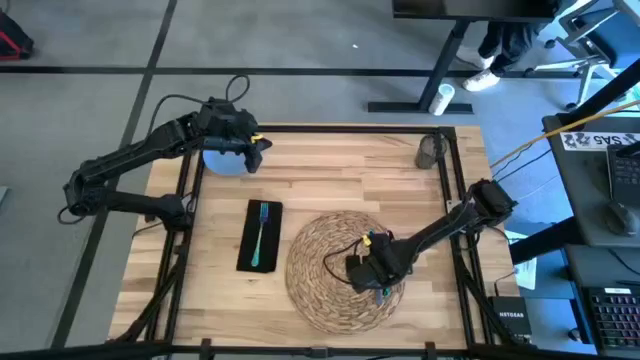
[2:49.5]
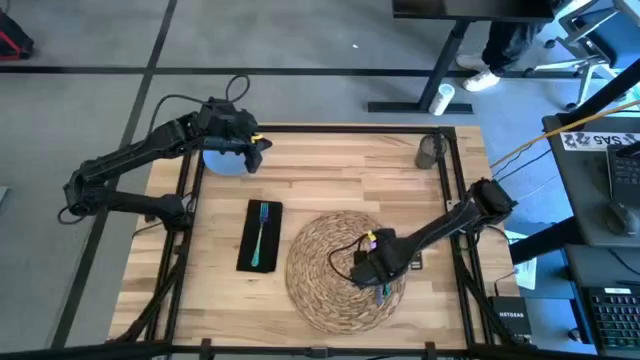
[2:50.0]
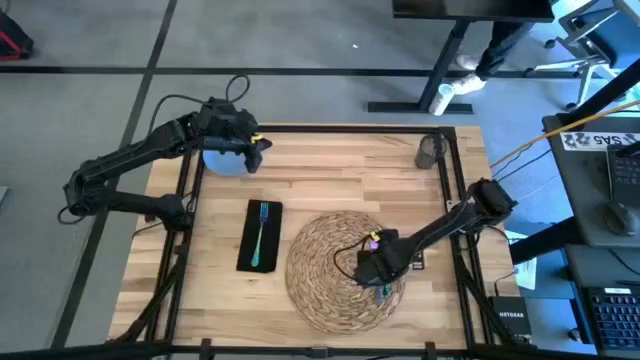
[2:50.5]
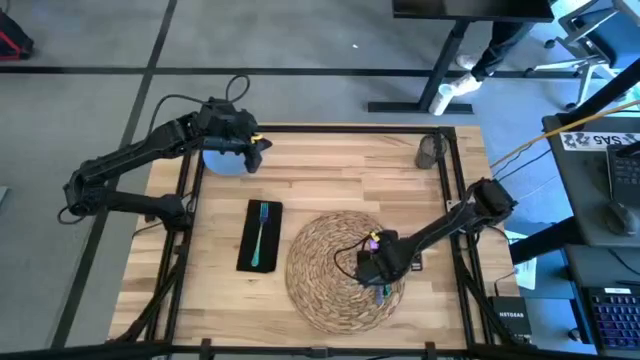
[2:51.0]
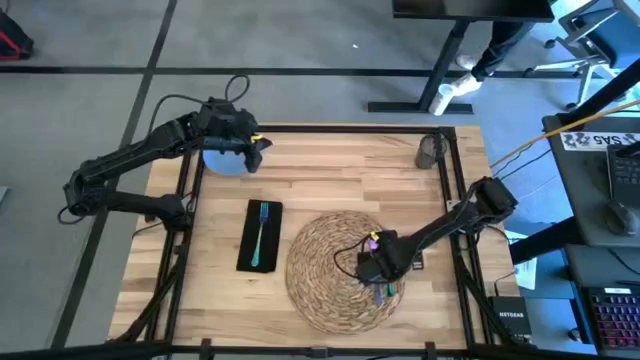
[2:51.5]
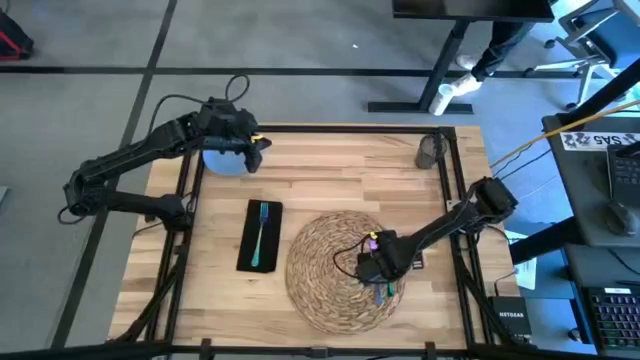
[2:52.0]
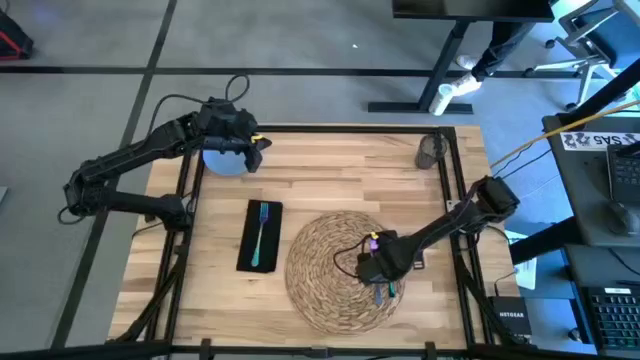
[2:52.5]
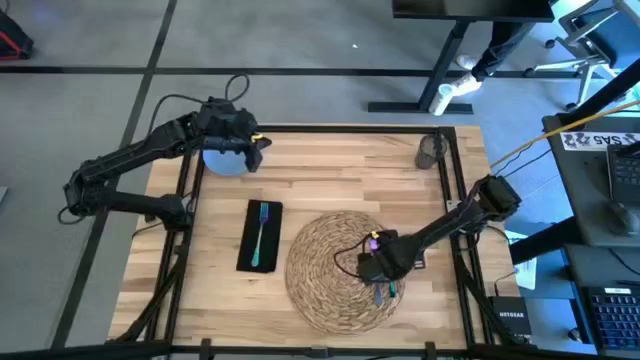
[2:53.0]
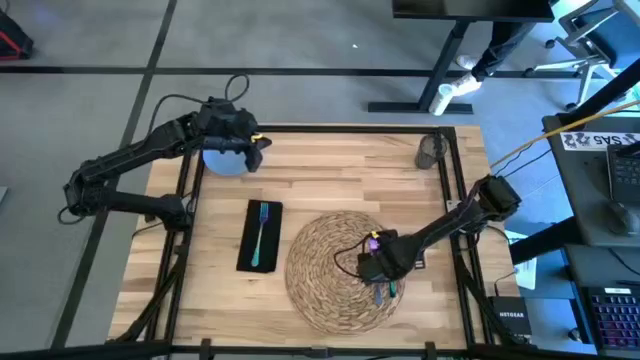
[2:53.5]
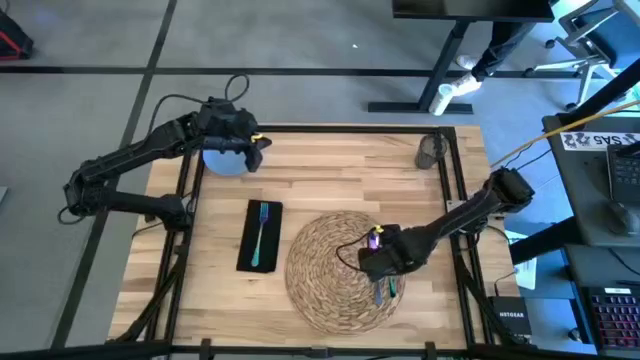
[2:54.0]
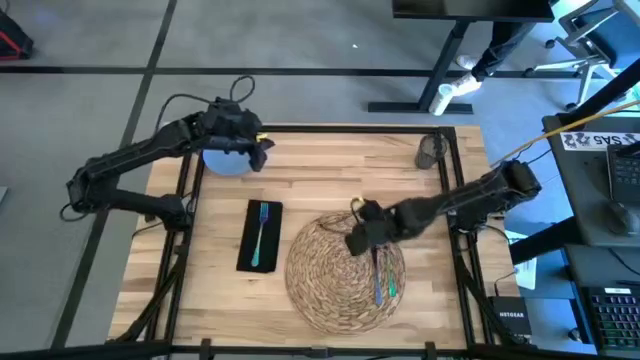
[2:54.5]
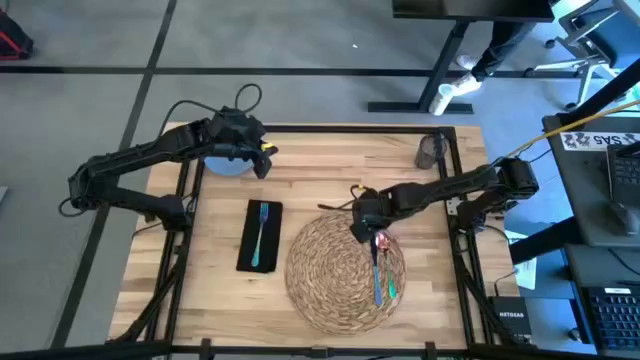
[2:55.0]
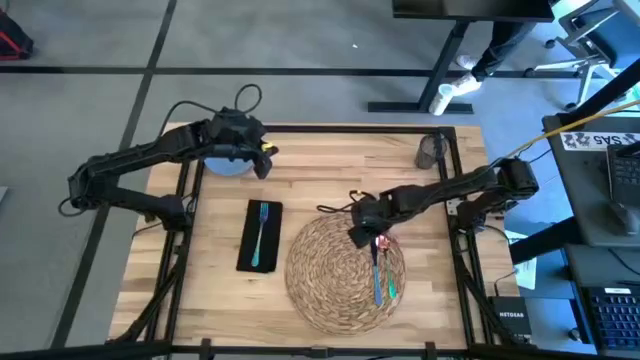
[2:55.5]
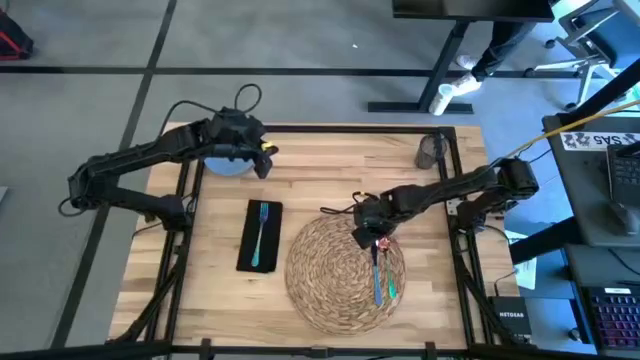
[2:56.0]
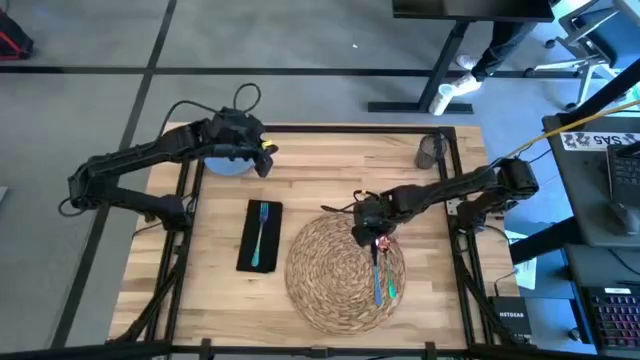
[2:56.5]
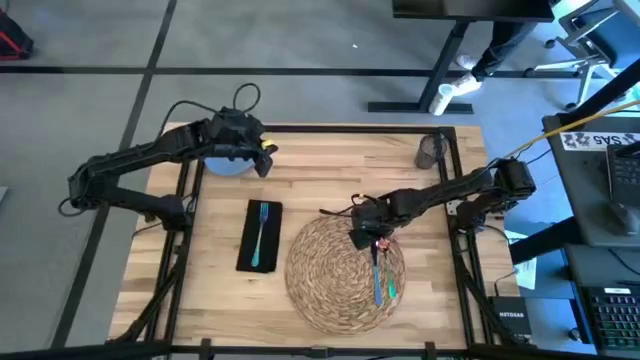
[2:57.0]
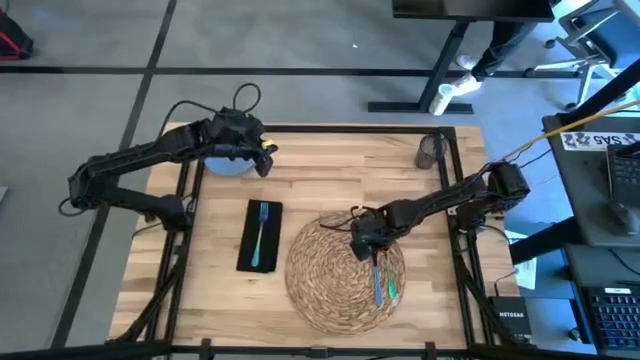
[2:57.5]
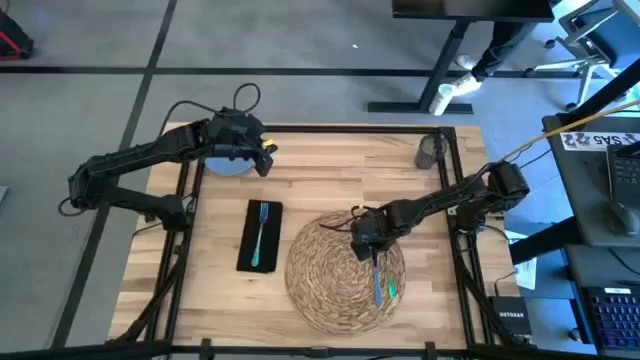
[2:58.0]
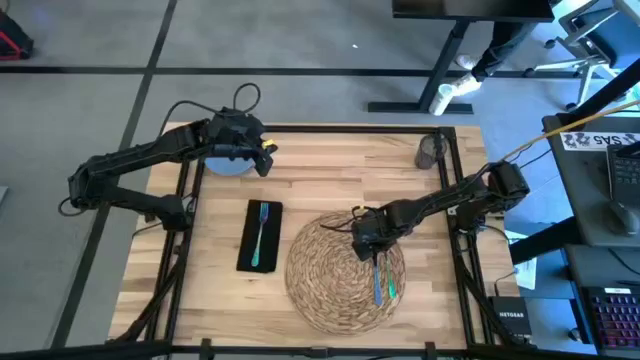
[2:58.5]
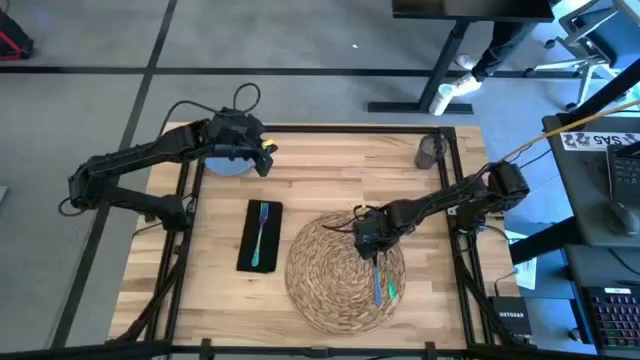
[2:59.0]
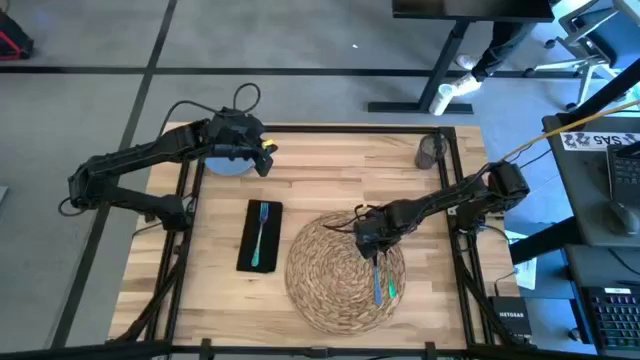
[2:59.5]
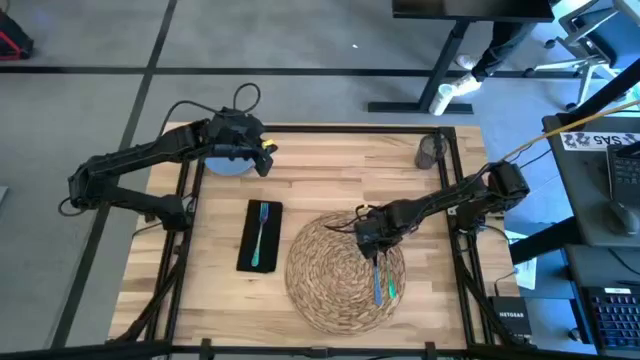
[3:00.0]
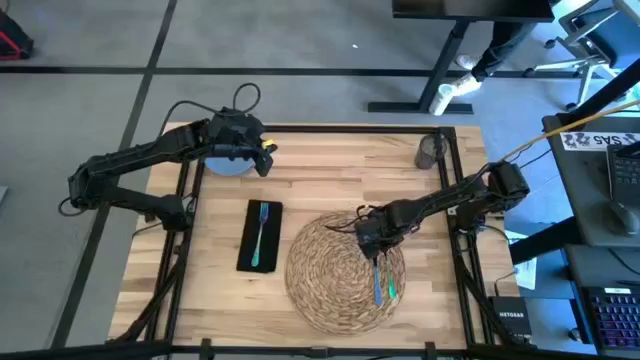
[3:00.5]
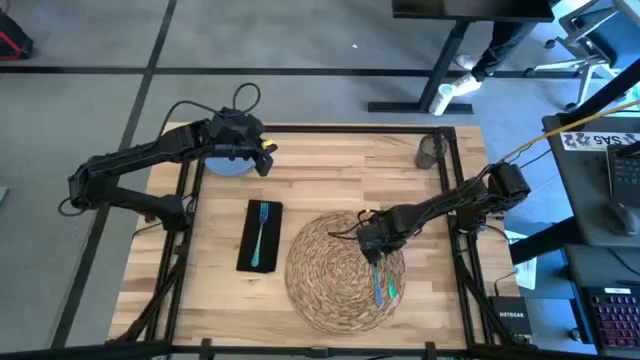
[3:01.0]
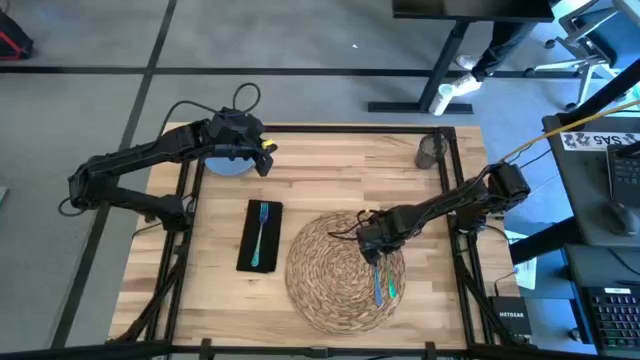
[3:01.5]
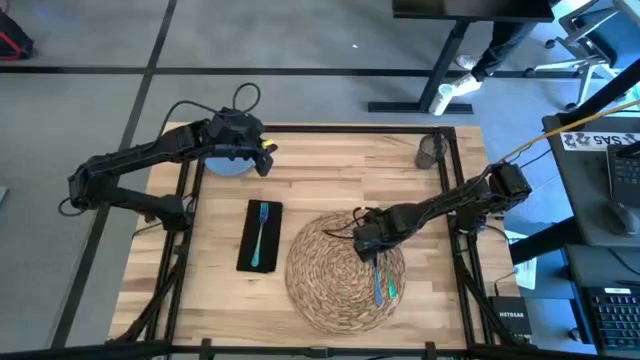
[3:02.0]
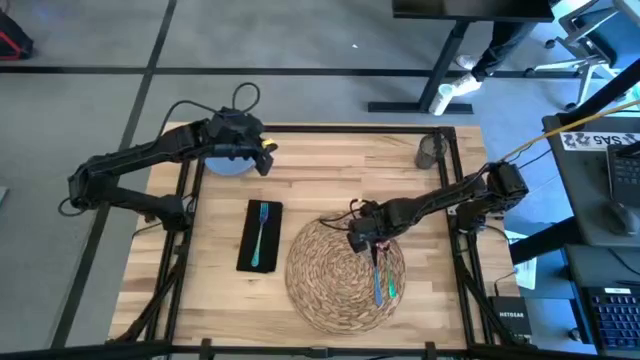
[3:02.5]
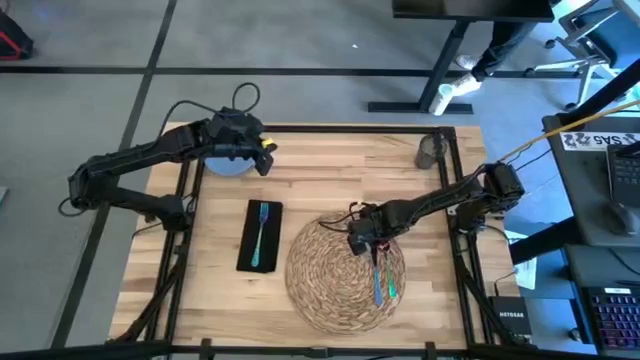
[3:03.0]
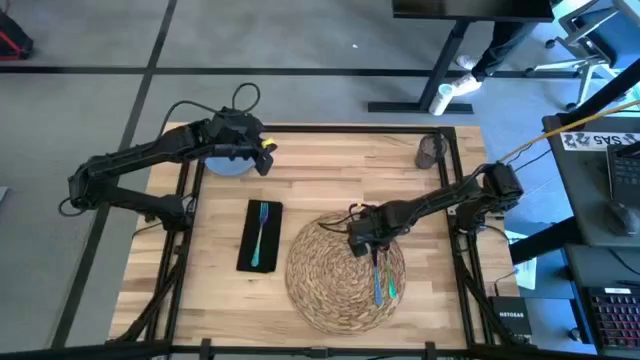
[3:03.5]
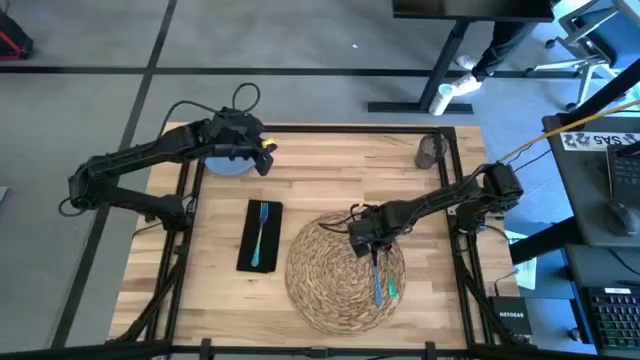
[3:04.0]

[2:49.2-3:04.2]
Task: Set table place
Adjust the blue spoon on the brown placemat

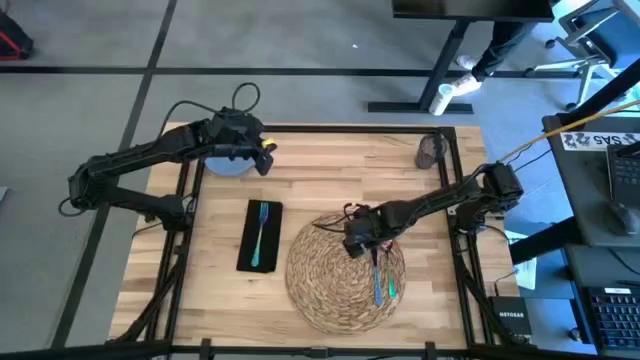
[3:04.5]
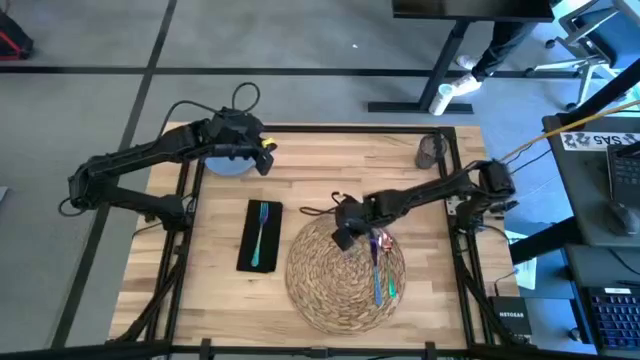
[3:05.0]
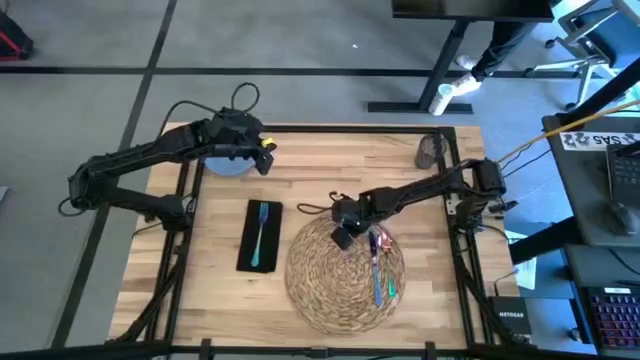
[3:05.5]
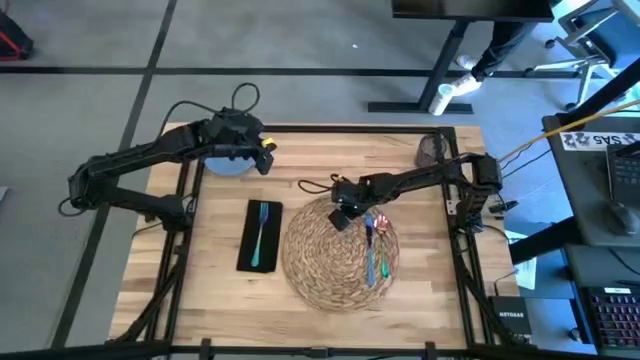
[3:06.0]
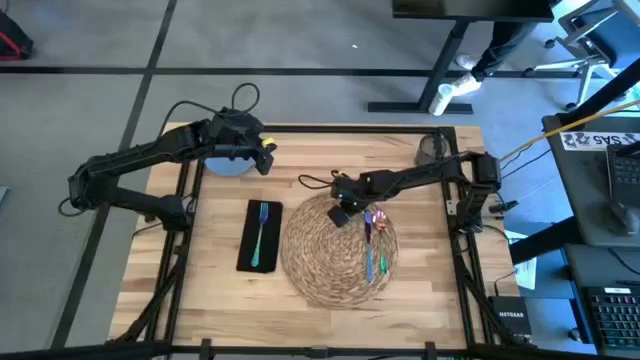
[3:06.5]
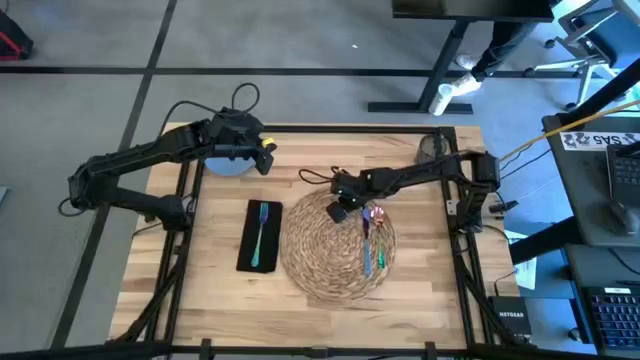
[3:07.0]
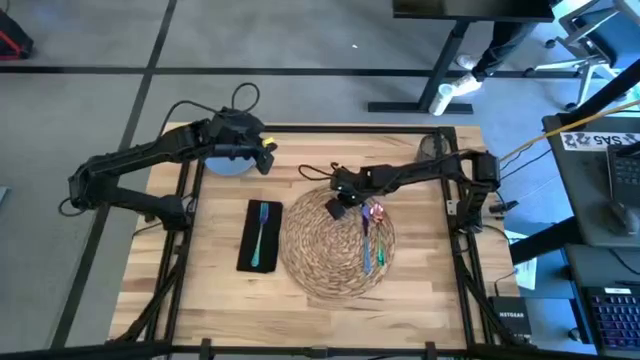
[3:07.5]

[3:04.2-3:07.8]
Adjust the brown placemat on the center table

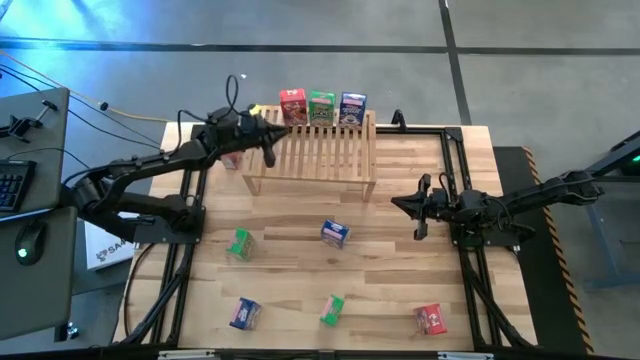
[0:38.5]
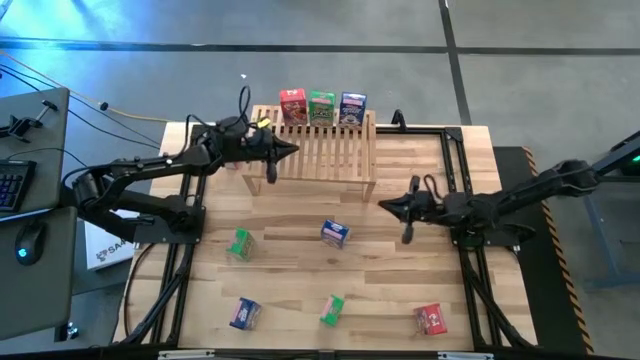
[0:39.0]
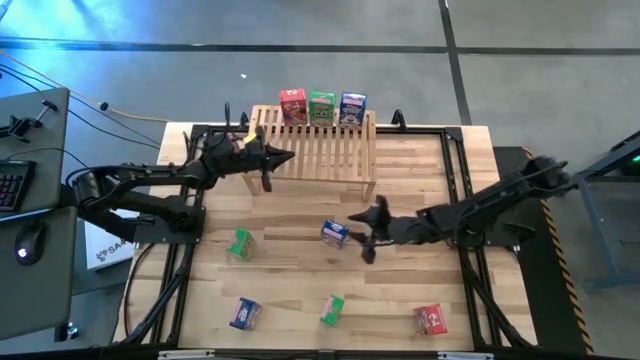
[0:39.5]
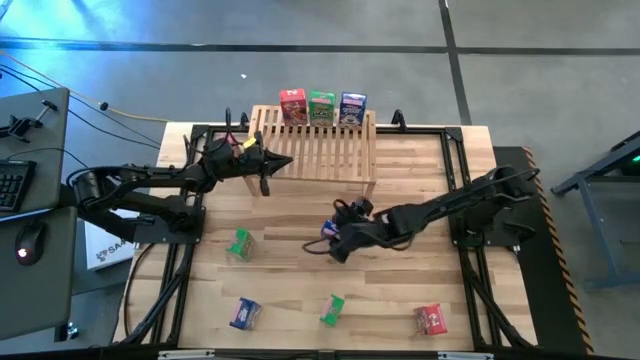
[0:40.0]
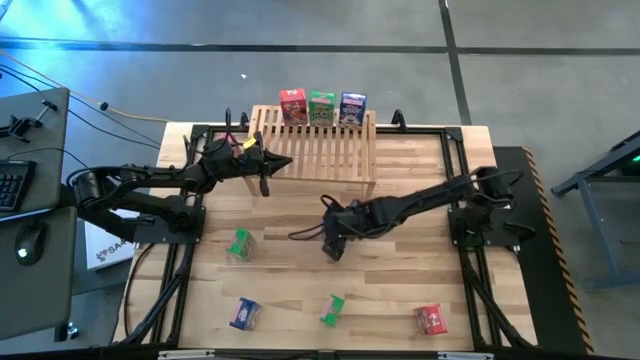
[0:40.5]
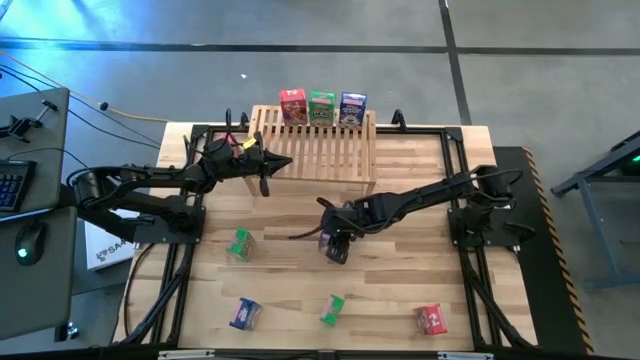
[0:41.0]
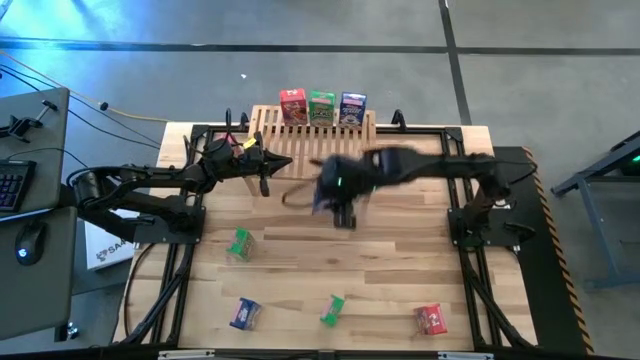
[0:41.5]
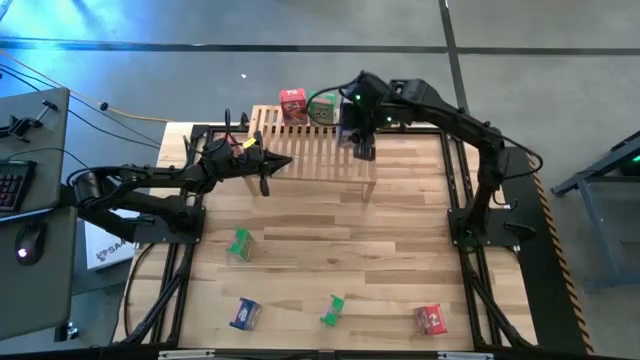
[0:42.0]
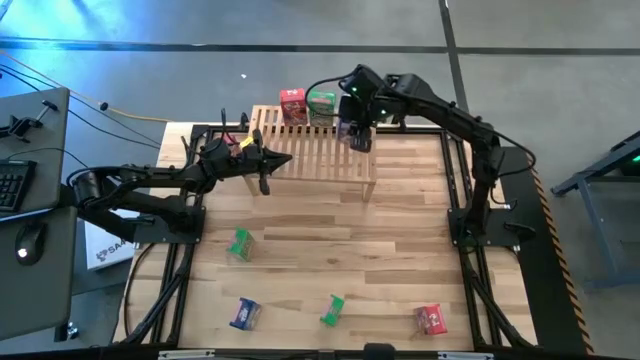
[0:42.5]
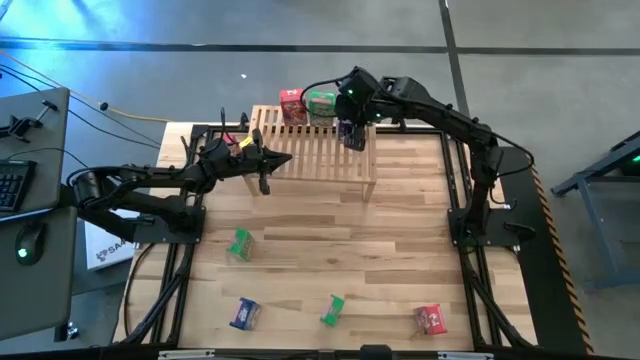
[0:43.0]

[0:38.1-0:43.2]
Task: Stack cereal on shelf
Put the top blue cereal box on the shelf aligned with the other blue cereal box
